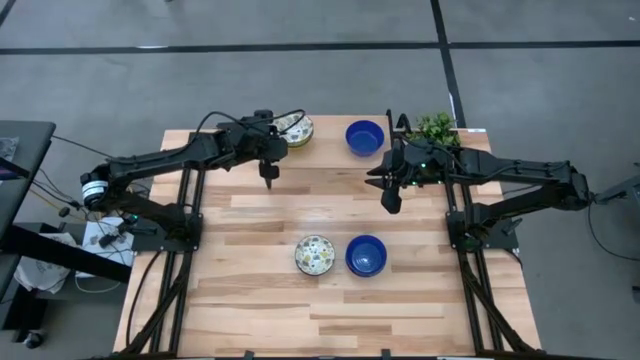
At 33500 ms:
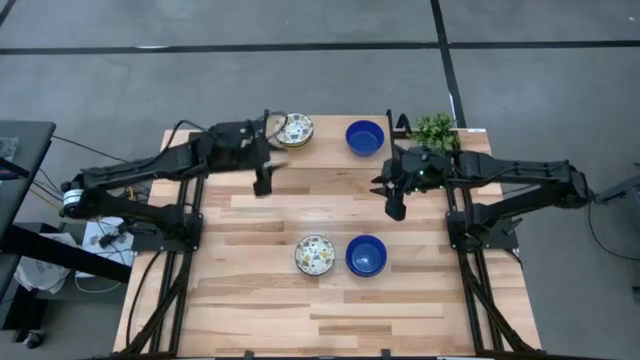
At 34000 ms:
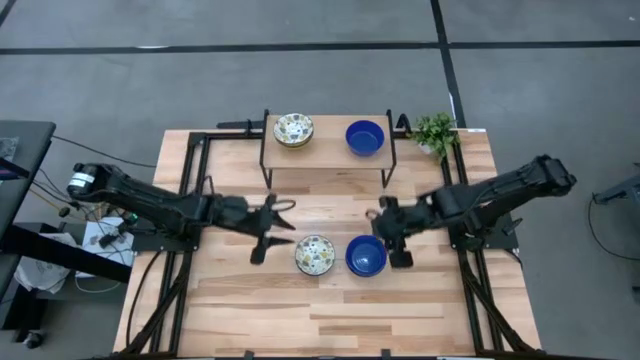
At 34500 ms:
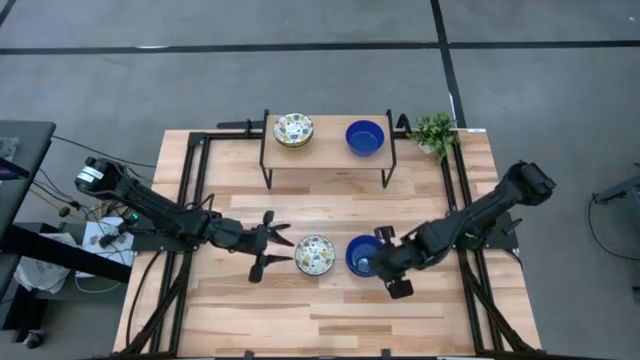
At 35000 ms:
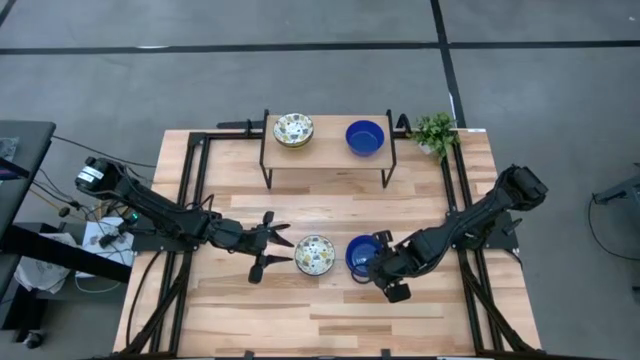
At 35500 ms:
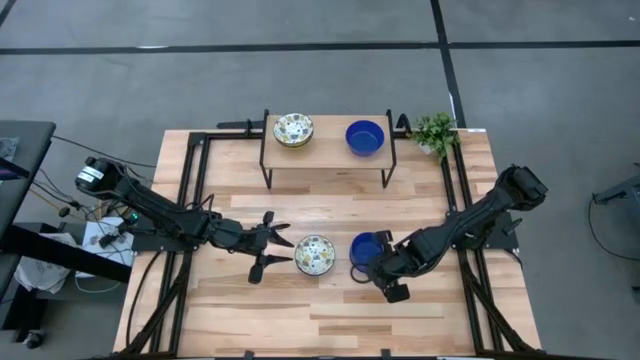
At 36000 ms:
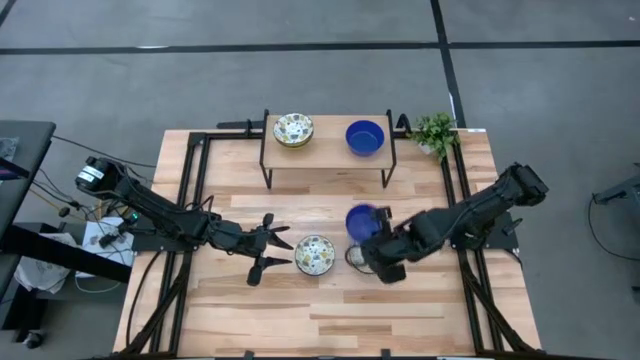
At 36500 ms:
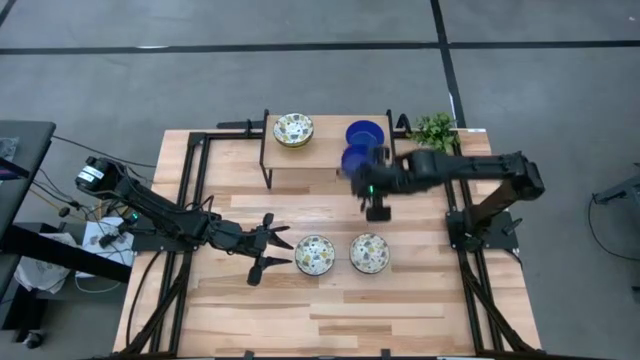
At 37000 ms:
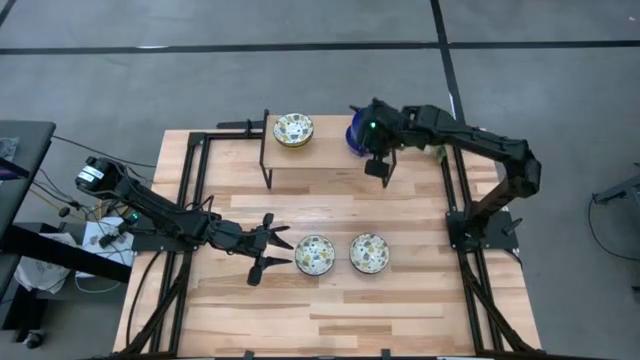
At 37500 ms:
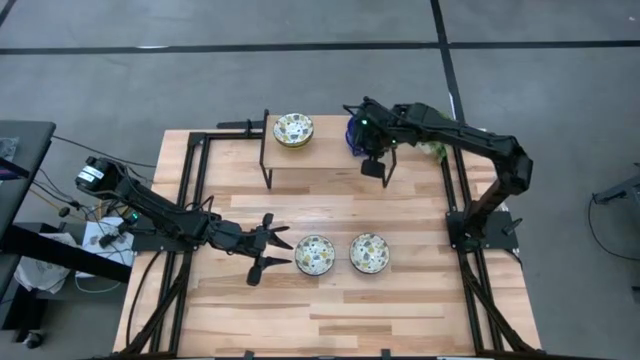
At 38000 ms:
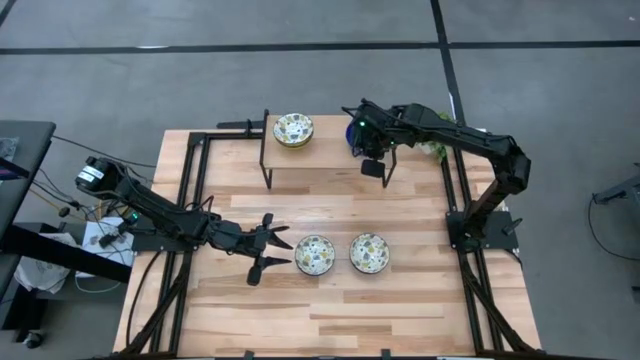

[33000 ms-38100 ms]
Task: Pick & Place Mini bowls
Stack the blue bowl on top of the blue bowl on the shelf

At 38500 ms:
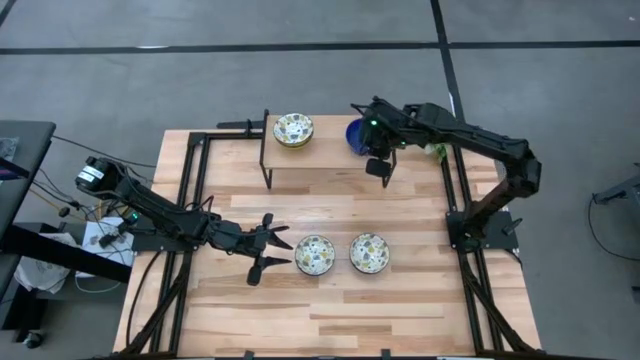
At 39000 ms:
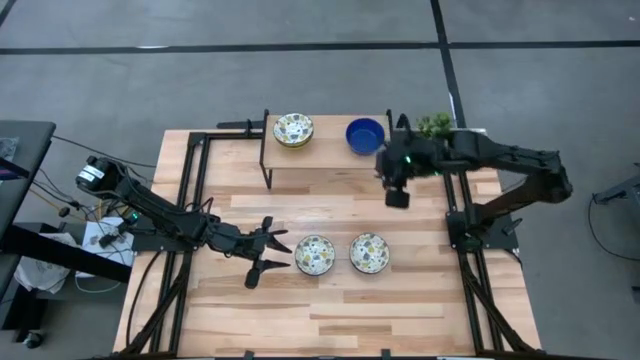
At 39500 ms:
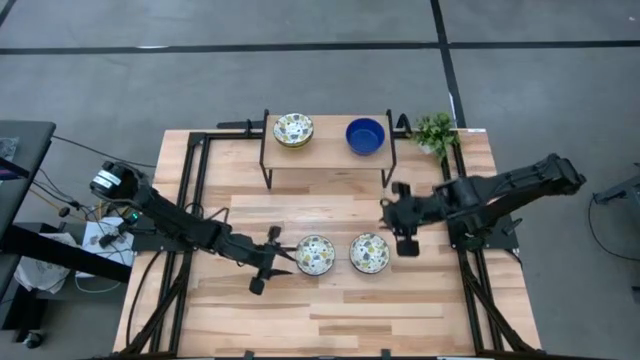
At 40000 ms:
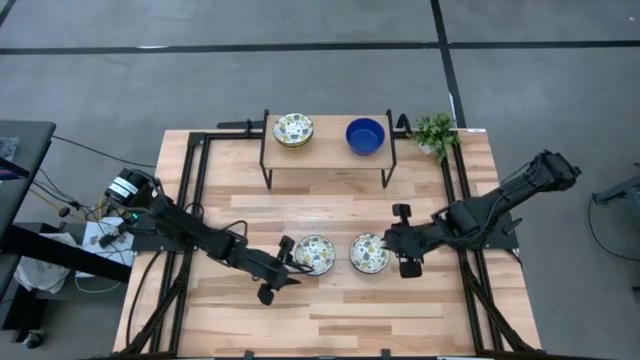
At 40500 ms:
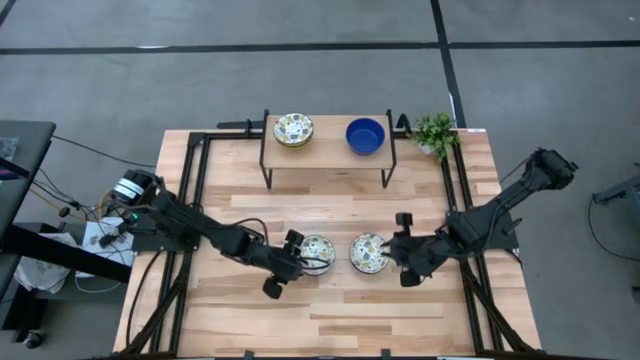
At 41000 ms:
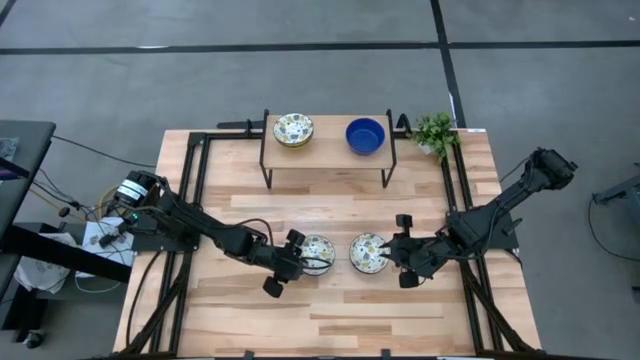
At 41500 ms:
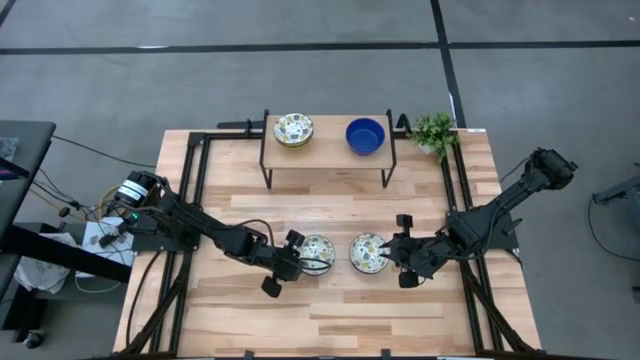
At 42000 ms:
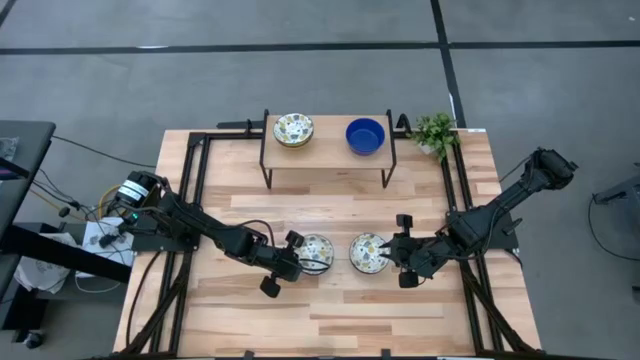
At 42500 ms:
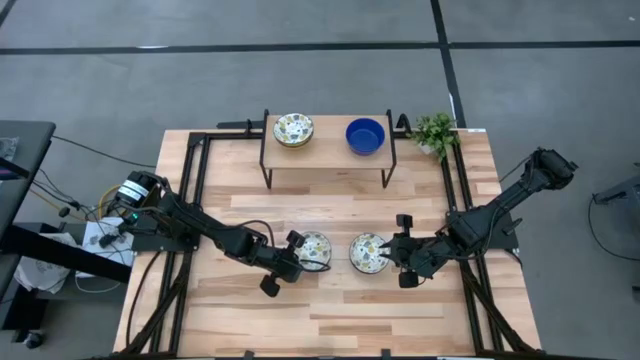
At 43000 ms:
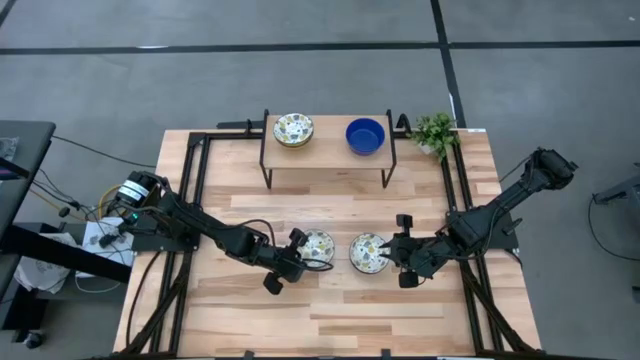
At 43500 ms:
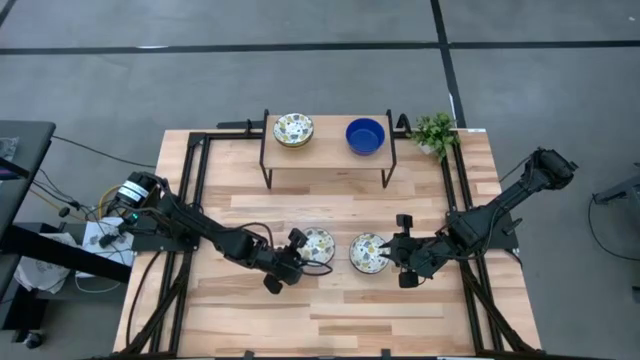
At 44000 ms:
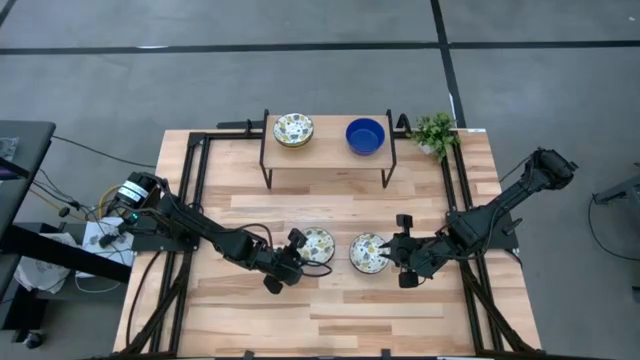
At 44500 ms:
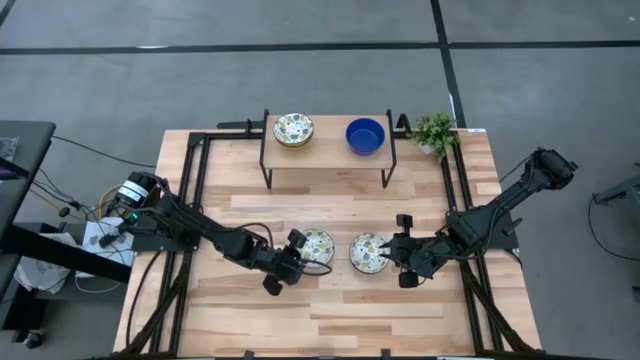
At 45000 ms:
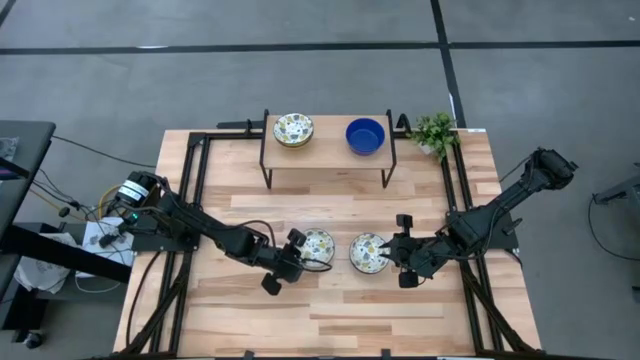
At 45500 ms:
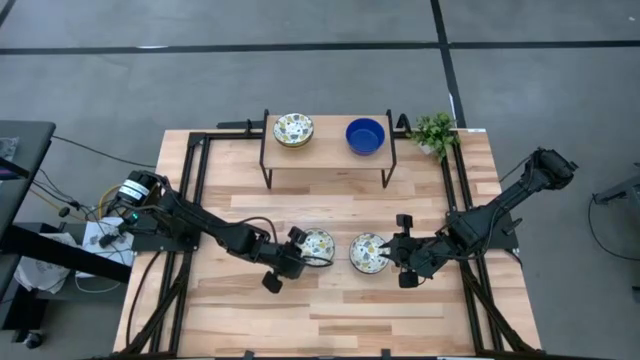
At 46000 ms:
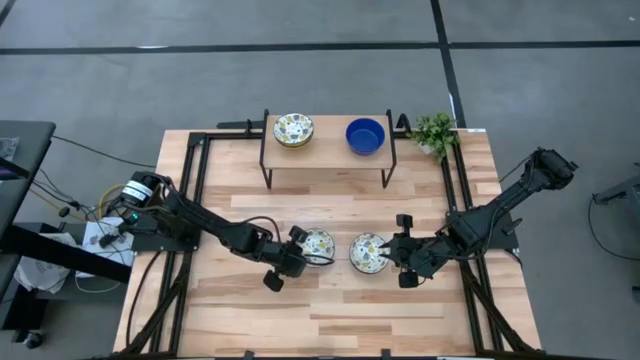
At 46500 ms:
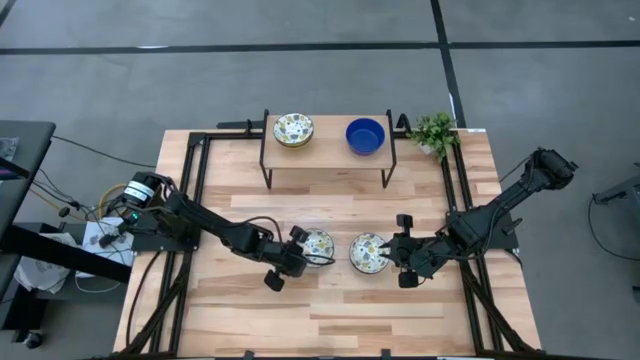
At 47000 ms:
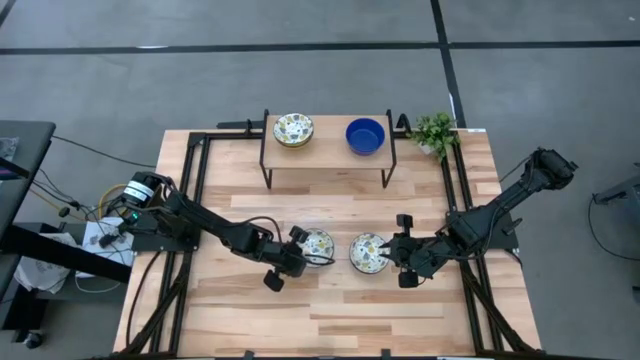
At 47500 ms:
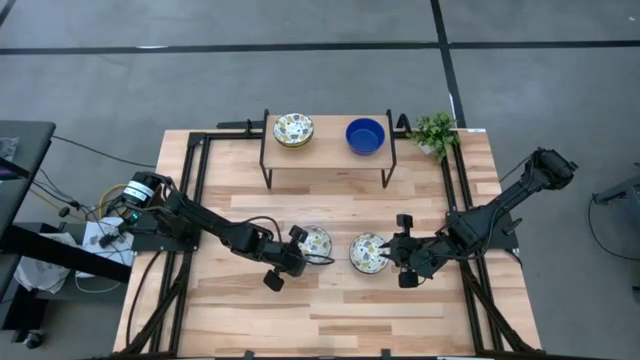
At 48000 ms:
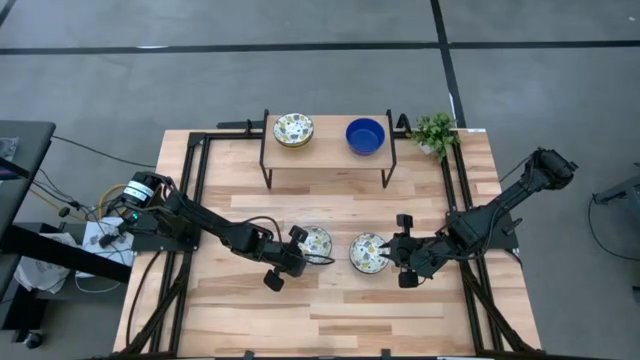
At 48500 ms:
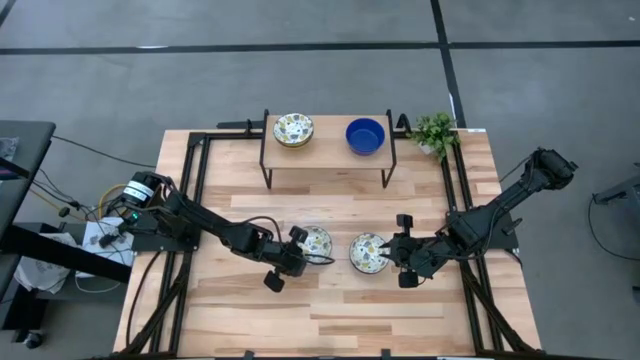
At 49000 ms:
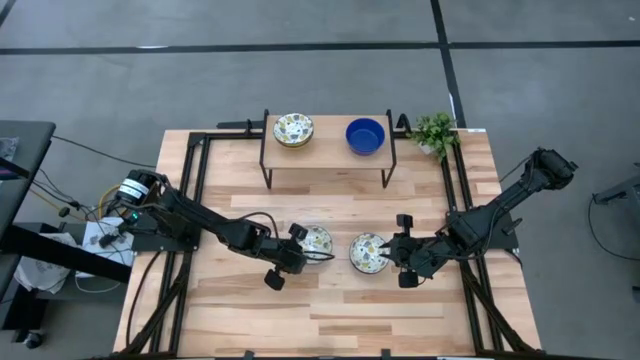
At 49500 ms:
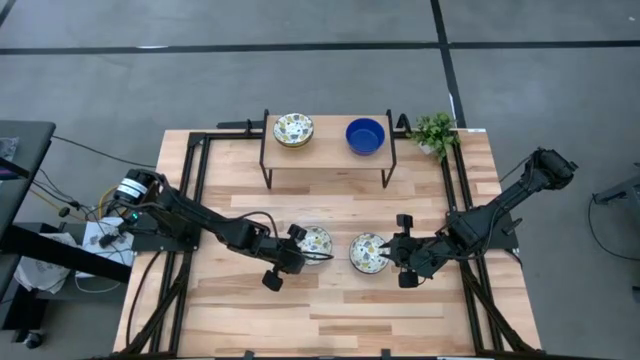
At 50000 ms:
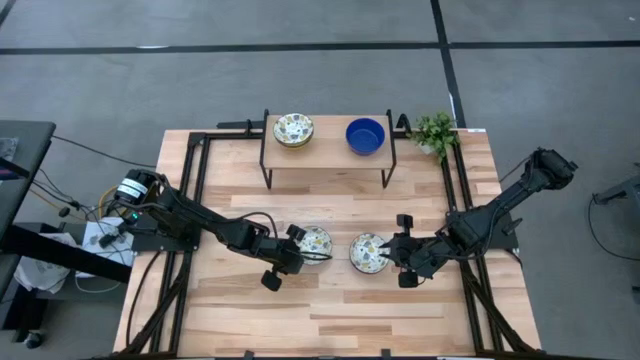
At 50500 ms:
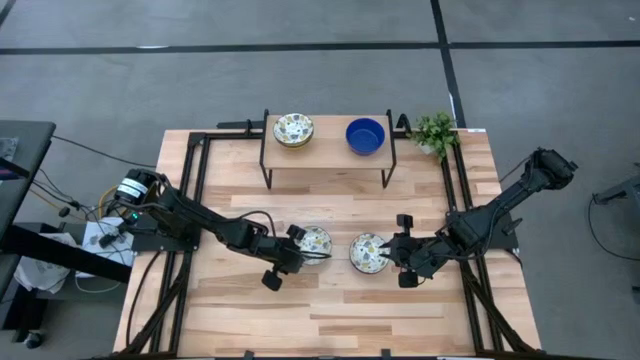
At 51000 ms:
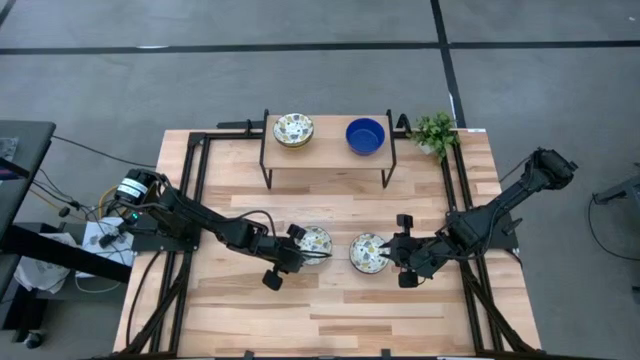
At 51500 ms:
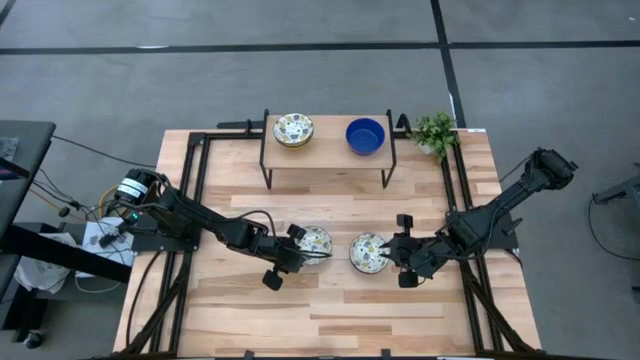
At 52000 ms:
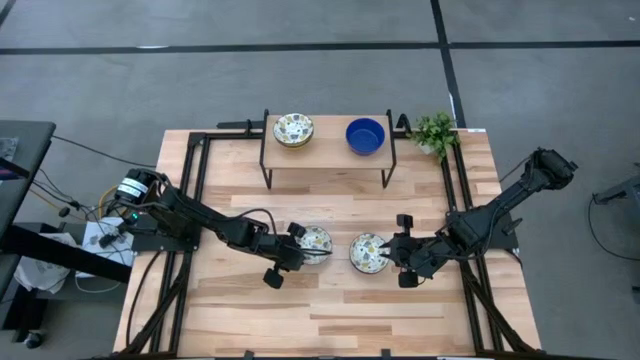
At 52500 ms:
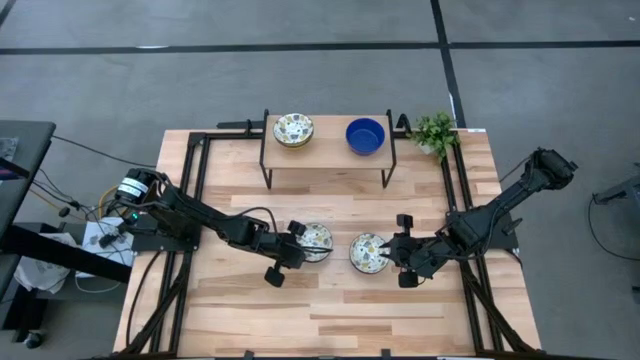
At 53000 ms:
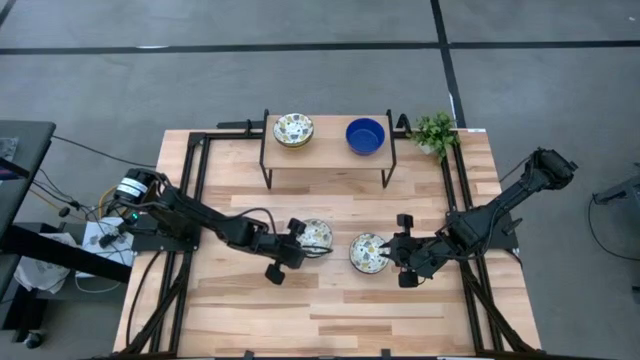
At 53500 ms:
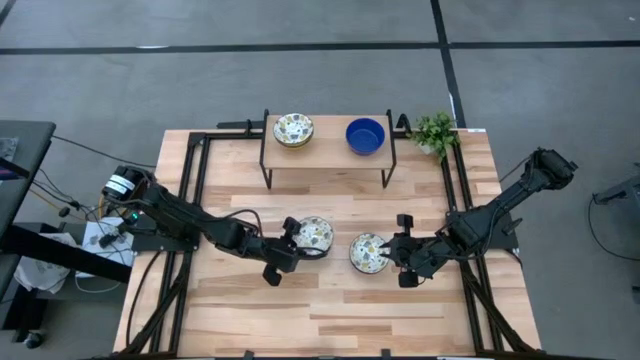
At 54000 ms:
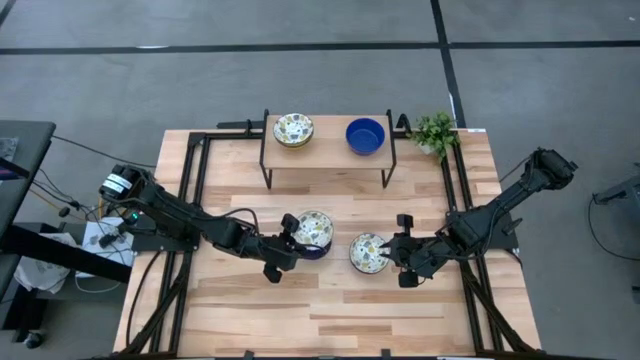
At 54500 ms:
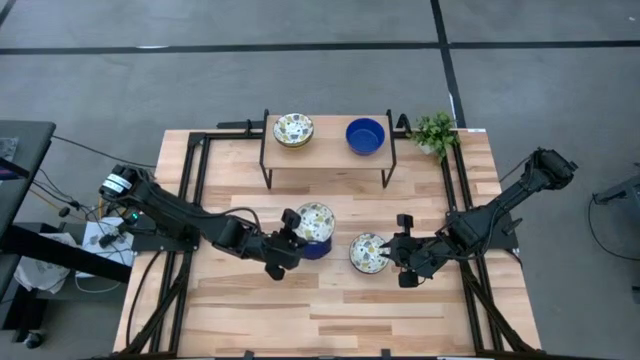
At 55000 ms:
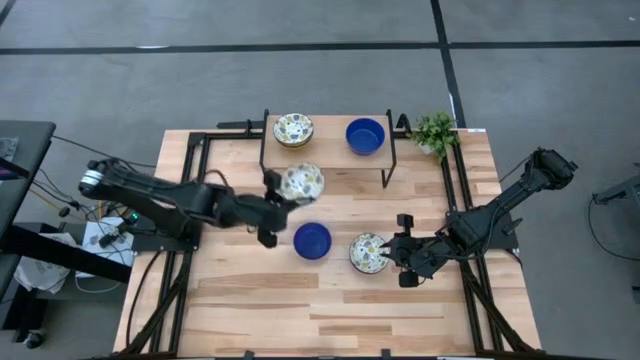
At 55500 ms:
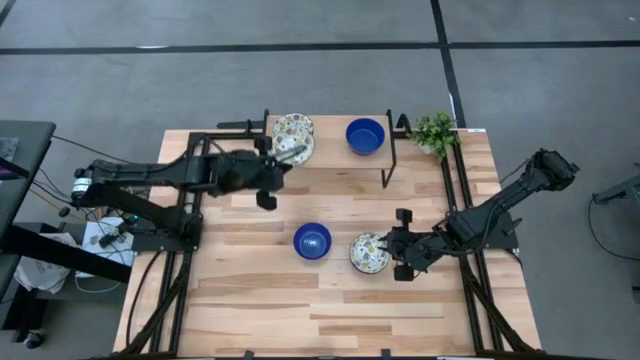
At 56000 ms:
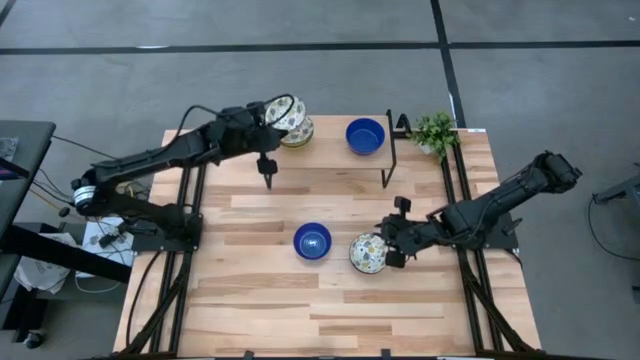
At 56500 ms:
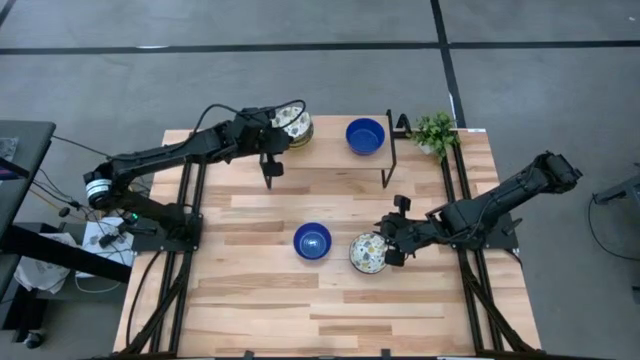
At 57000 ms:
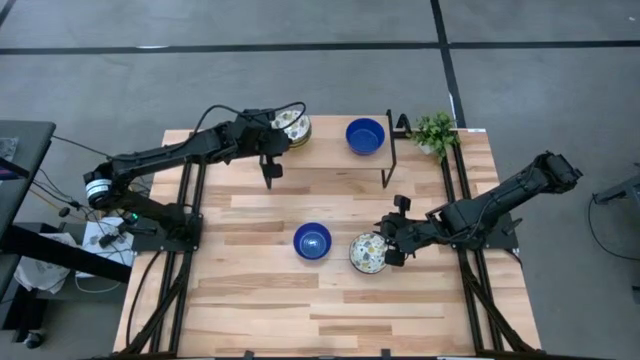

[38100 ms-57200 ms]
Stack the white patterned bowl on top of the white patterned bowl on the shelf
